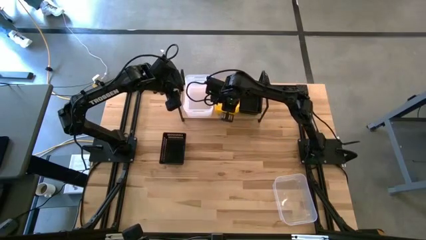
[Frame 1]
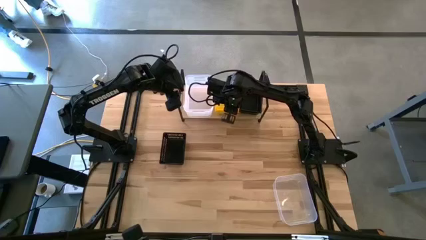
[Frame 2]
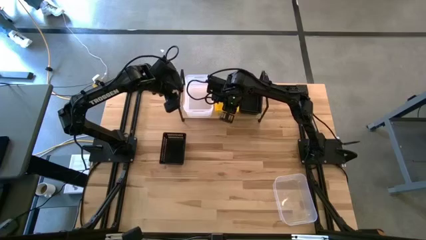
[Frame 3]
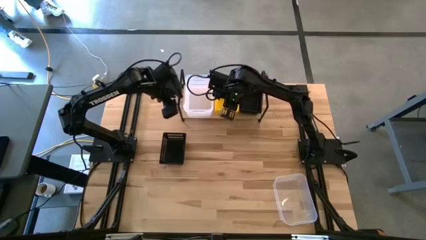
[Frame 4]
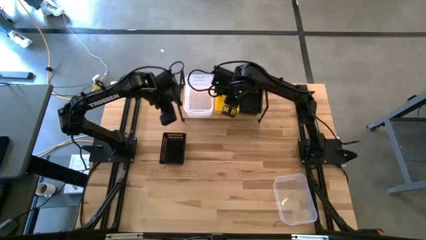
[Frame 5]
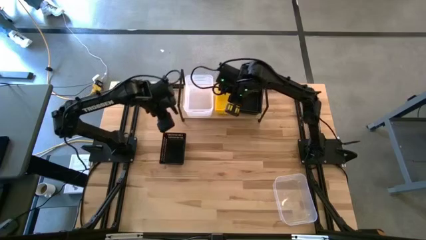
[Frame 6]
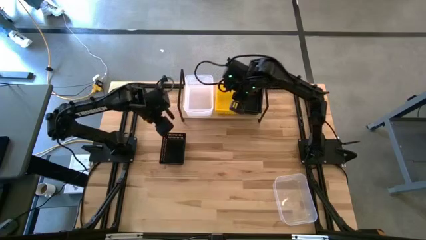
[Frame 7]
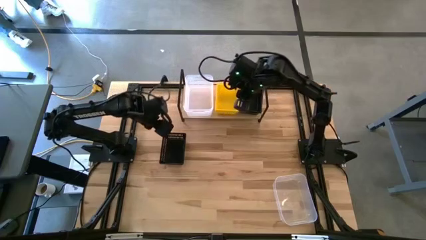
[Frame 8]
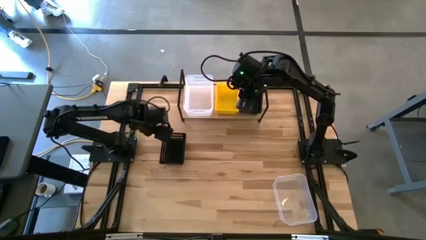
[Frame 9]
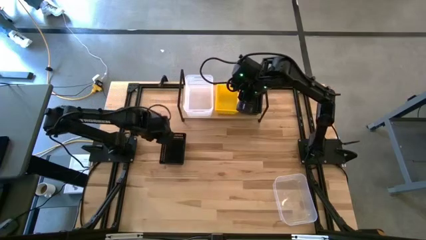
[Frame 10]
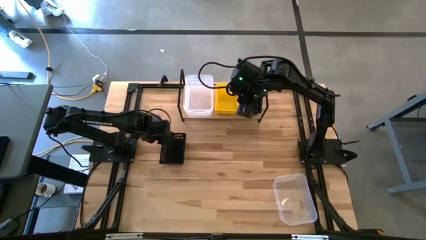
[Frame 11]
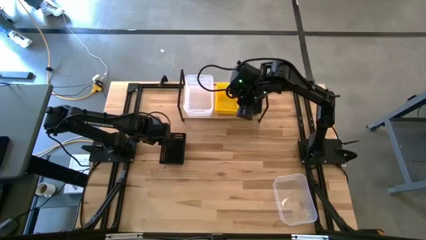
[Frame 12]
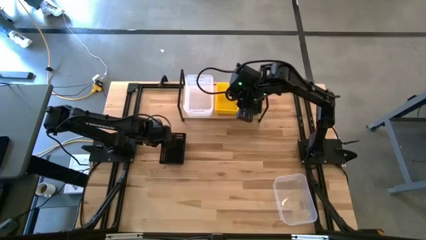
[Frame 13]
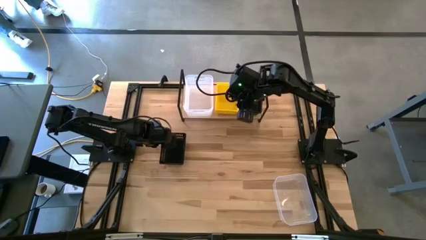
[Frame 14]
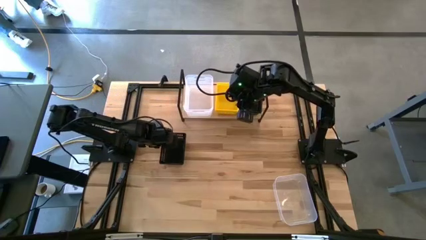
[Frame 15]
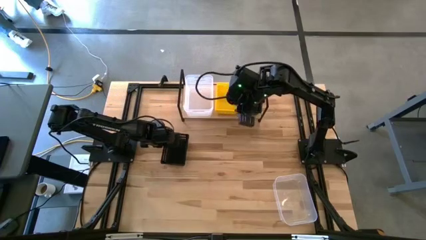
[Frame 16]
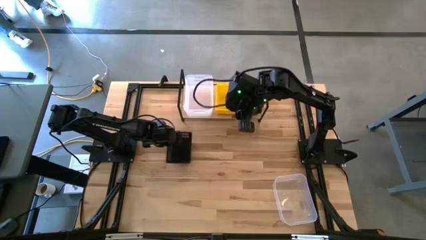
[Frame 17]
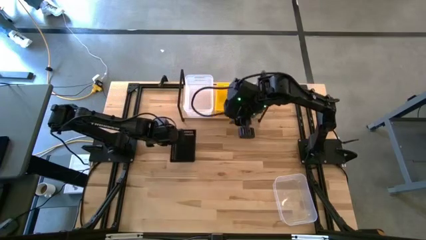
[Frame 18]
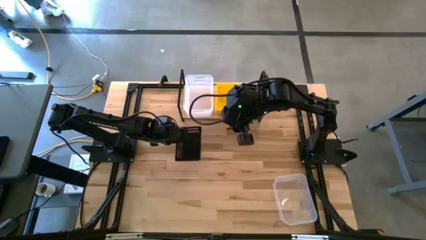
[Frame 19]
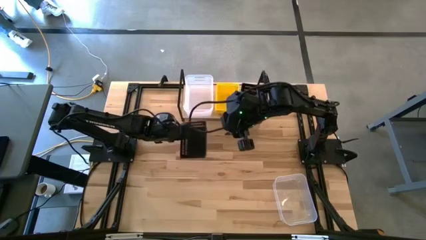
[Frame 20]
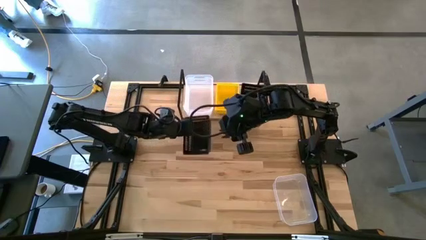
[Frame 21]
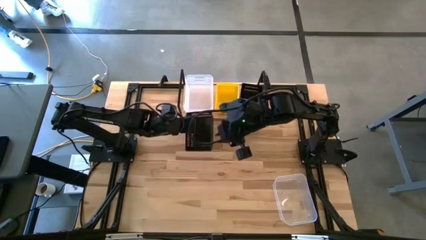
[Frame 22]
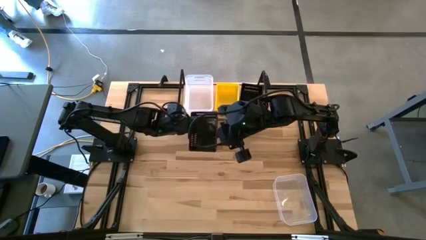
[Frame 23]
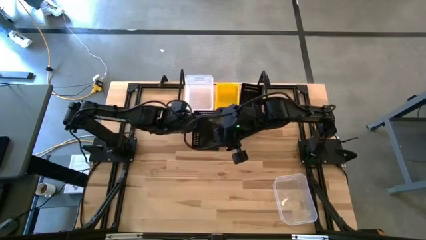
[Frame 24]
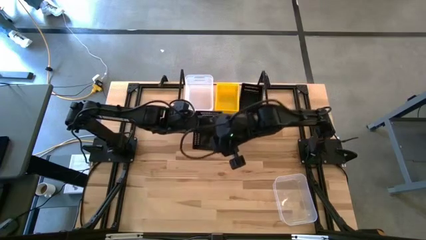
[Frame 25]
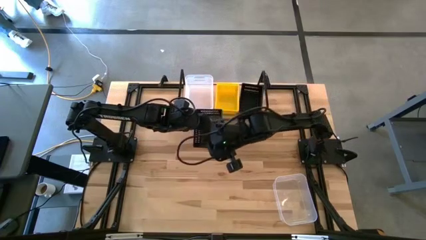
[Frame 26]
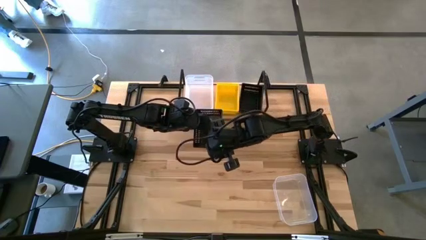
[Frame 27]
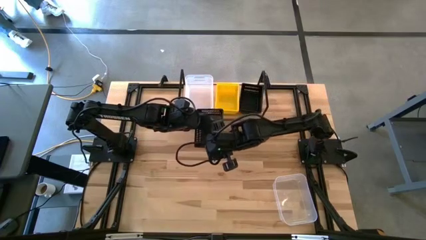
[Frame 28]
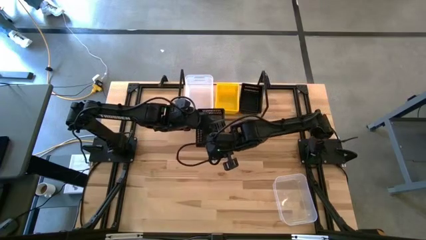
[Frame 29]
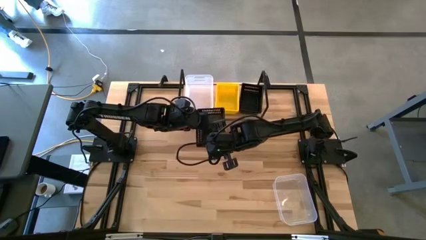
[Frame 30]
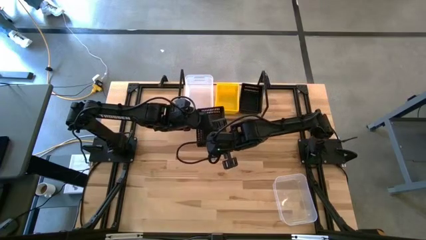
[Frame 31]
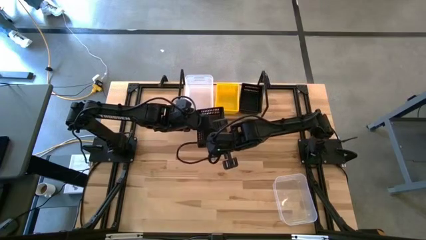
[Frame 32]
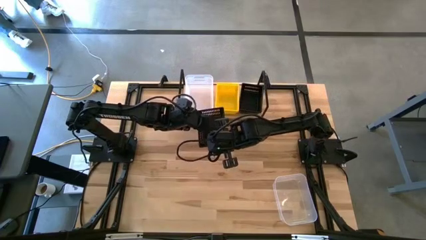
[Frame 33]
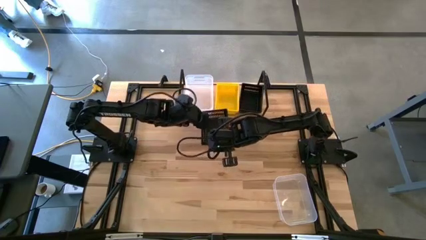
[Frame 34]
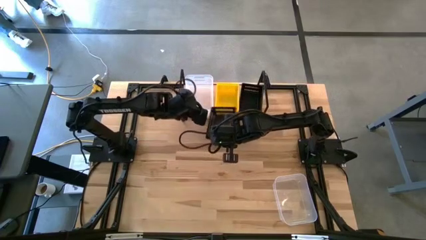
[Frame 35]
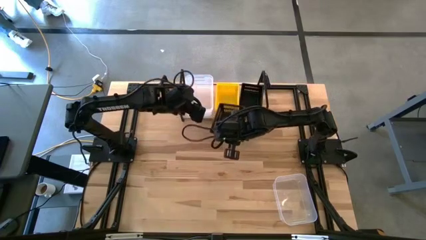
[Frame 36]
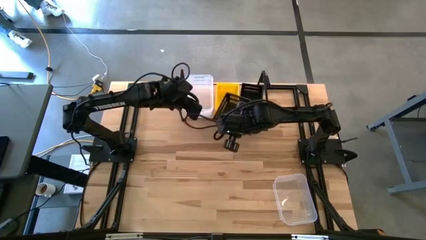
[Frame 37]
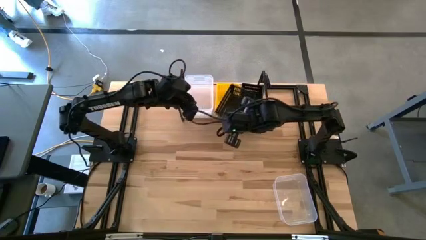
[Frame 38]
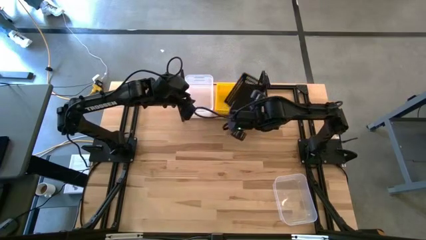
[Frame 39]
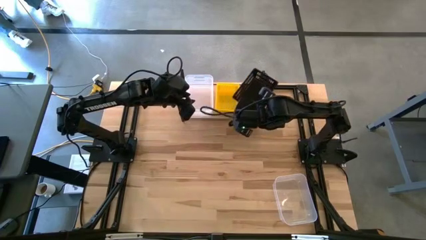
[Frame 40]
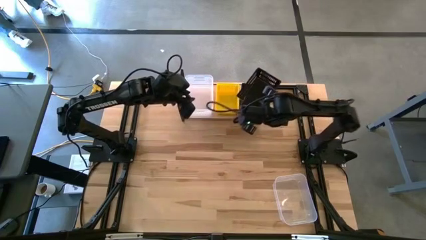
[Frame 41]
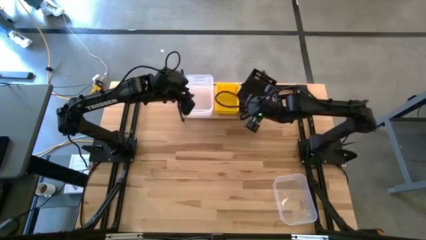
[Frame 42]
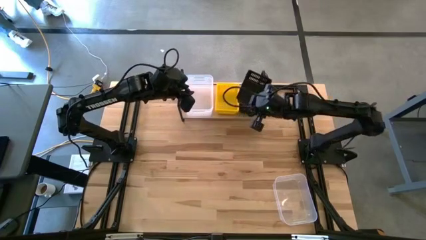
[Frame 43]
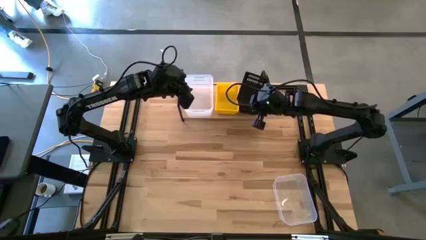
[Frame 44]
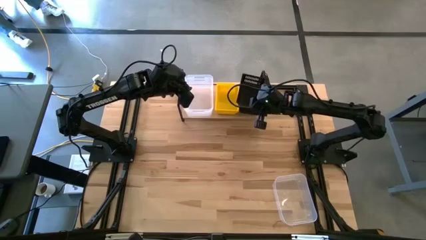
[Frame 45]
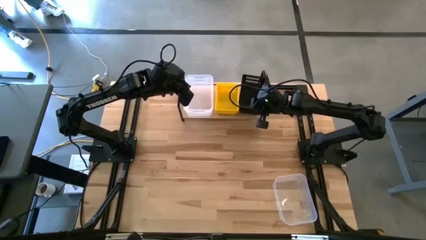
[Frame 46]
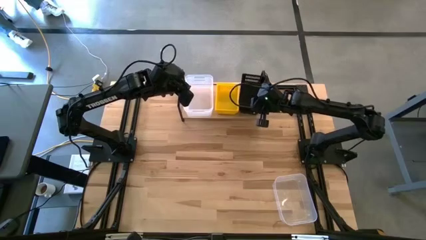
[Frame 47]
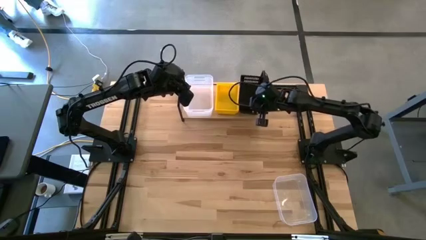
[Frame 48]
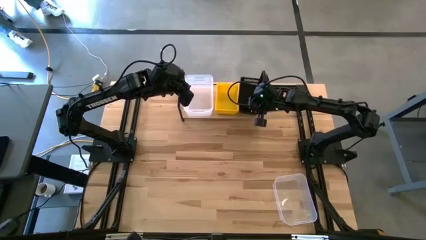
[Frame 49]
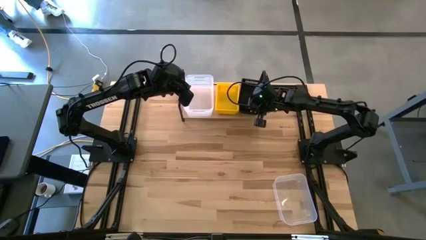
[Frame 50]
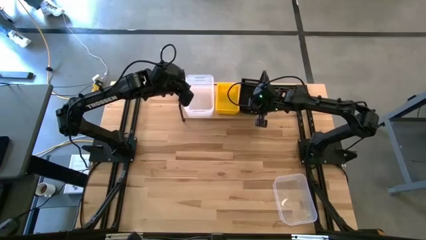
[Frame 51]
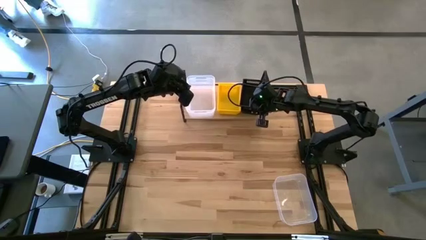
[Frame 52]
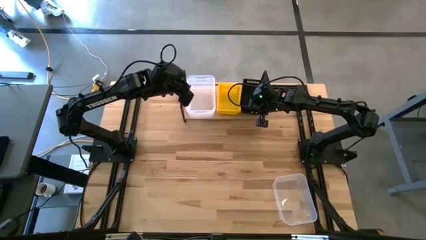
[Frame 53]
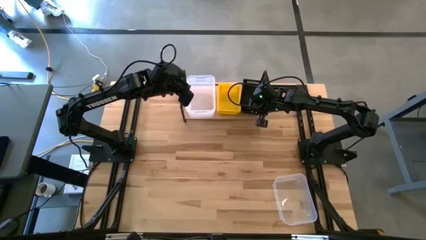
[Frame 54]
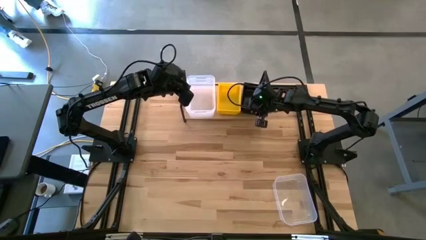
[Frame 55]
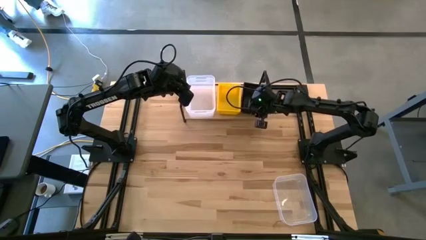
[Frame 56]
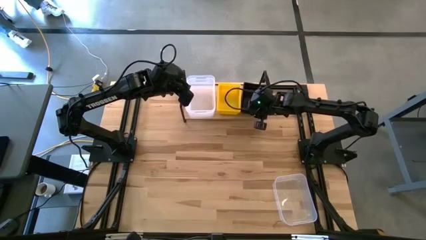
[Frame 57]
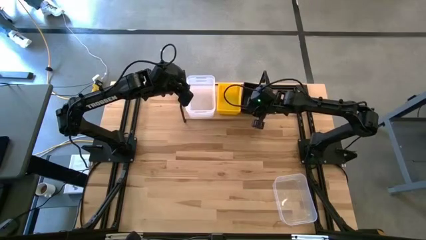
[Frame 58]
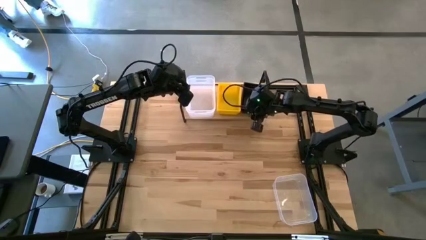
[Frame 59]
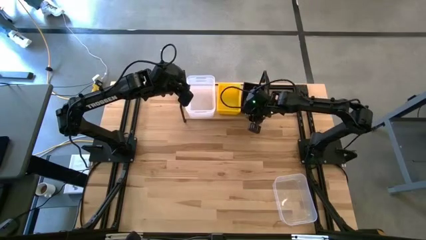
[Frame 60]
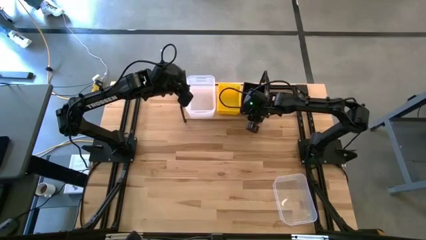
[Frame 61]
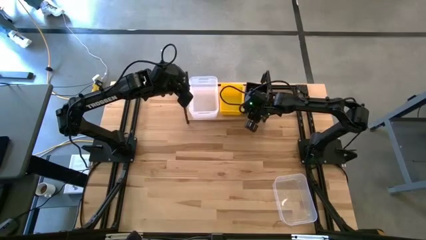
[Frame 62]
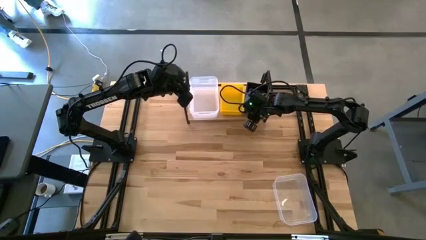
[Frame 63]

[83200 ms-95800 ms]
Task: Stack baskets on shelf by color
Stack the black bin on the black bin on the shelf

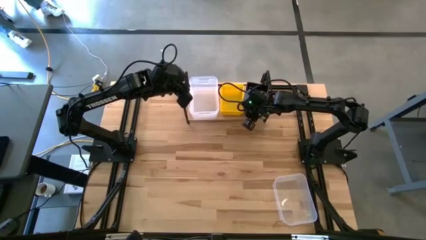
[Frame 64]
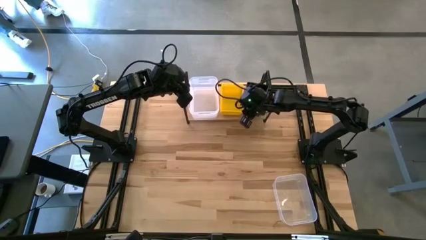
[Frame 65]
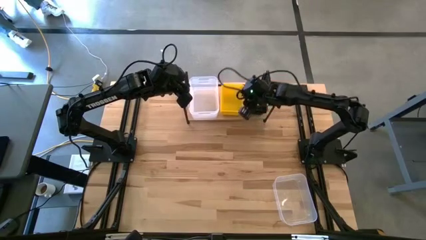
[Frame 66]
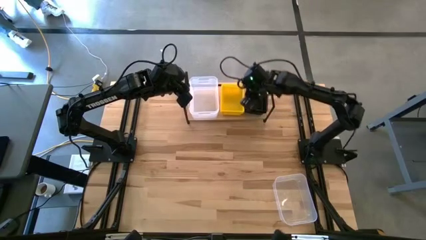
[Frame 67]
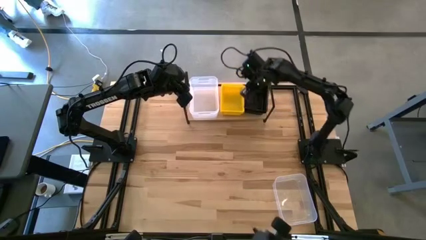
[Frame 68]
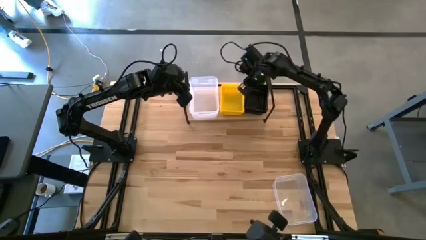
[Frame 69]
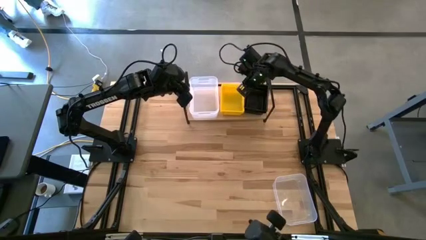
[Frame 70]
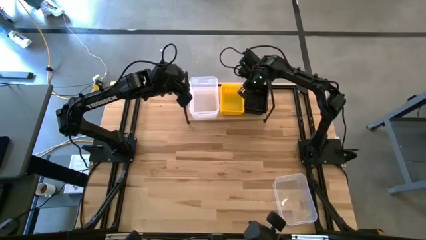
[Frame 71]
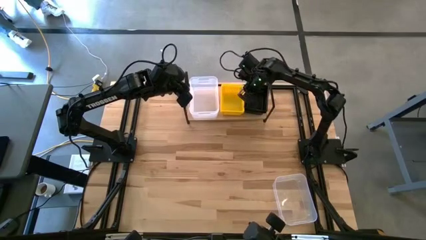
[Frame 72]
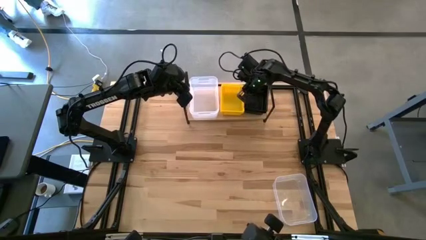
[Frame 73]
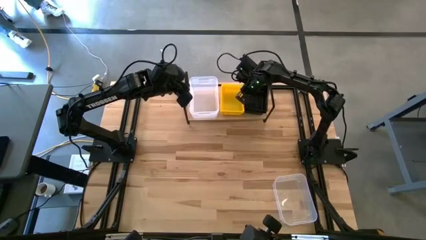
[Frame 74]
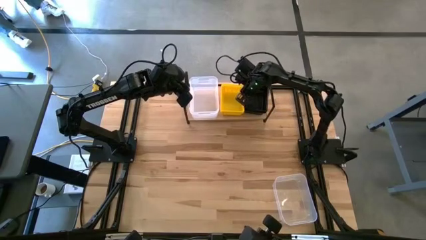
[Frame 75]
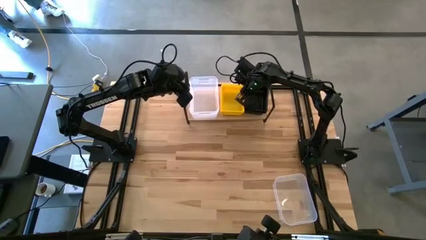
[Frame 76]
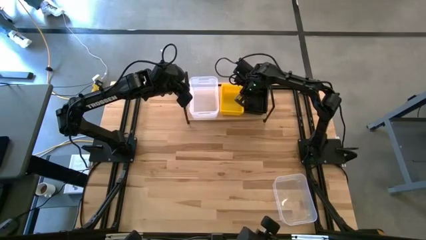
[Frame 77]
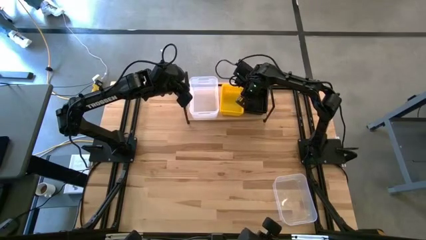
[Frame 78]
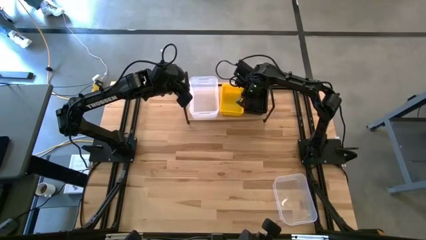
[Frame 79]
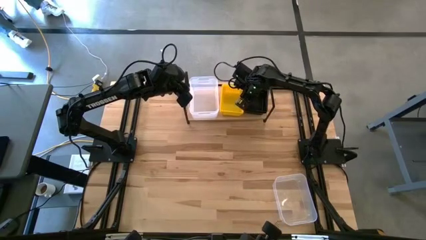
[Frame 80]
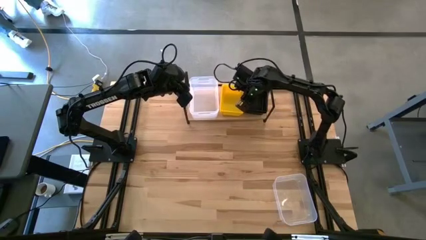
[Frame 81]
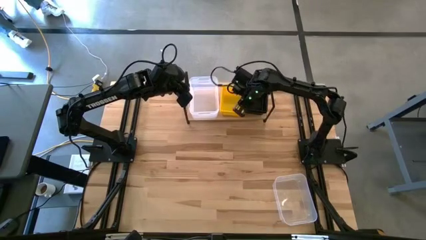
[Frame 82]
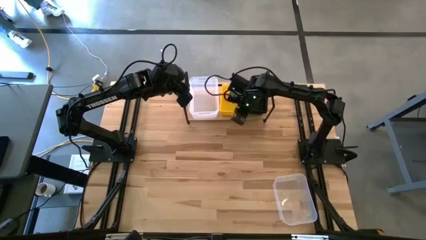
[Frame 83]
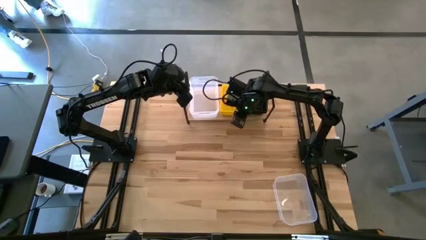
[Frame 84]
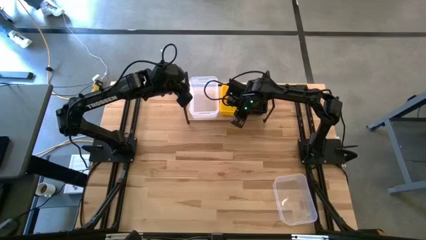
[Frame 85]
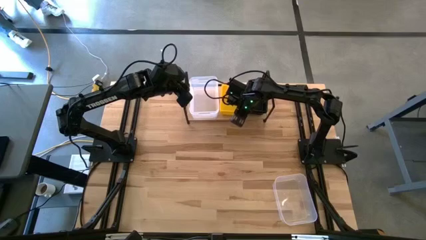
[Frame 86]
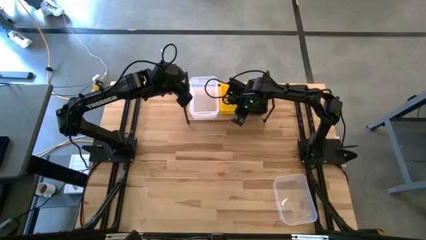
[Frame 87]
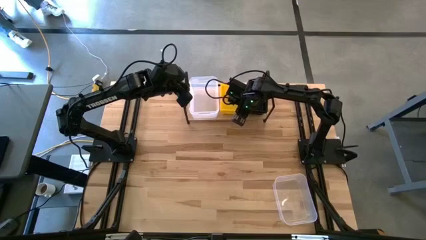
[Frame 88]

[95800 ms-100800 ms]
Adjust the yellow bins on the shelf
